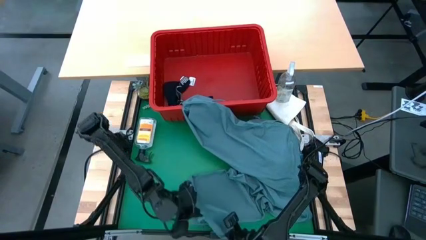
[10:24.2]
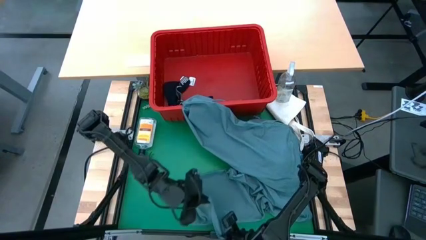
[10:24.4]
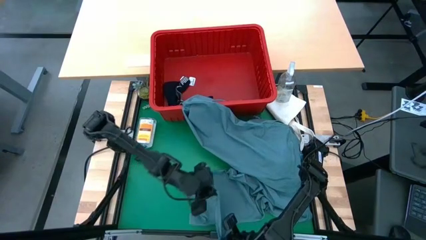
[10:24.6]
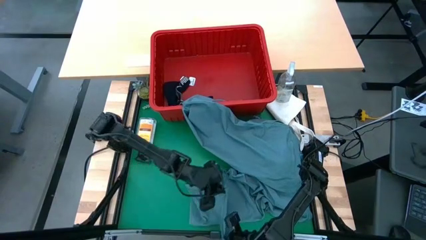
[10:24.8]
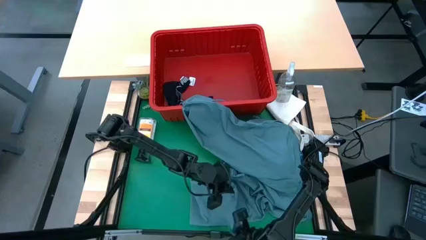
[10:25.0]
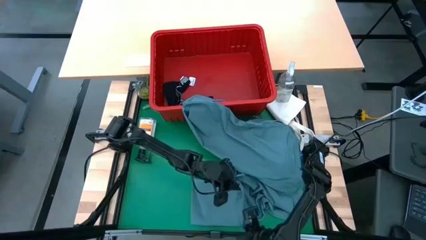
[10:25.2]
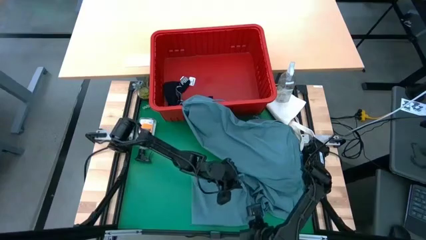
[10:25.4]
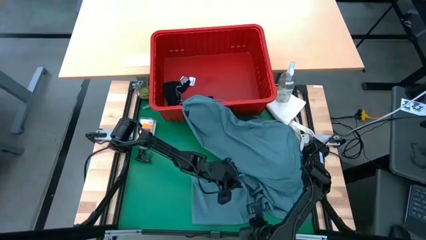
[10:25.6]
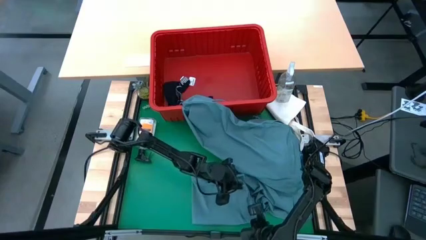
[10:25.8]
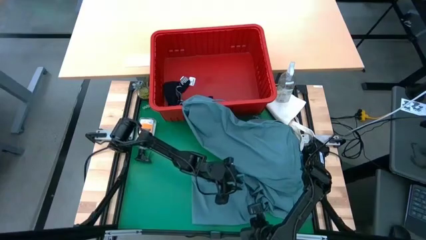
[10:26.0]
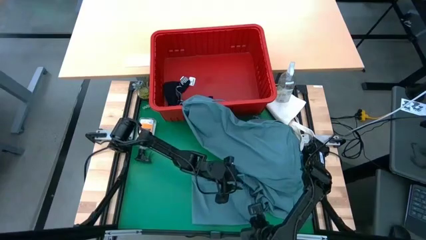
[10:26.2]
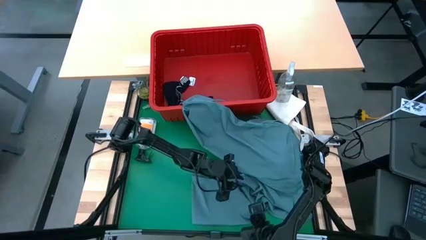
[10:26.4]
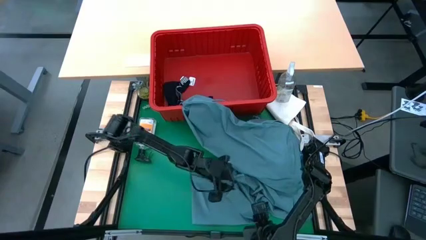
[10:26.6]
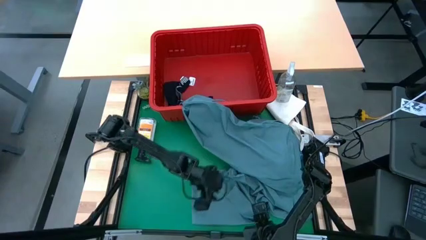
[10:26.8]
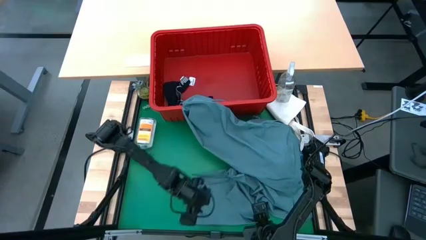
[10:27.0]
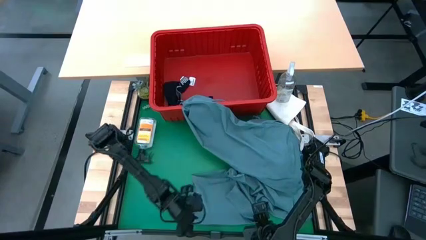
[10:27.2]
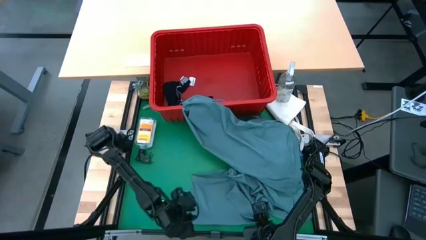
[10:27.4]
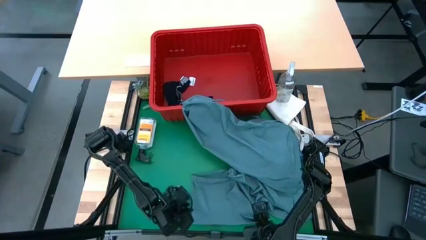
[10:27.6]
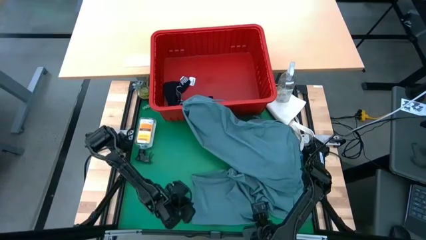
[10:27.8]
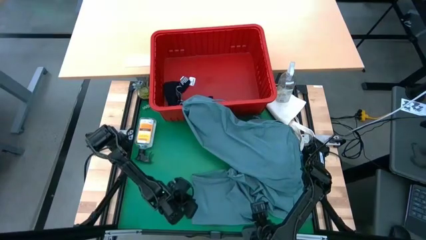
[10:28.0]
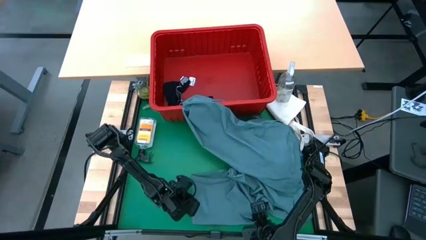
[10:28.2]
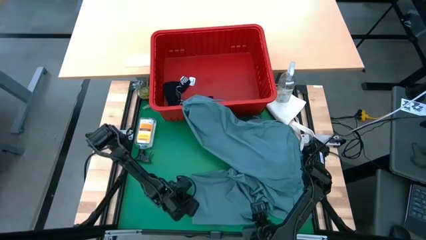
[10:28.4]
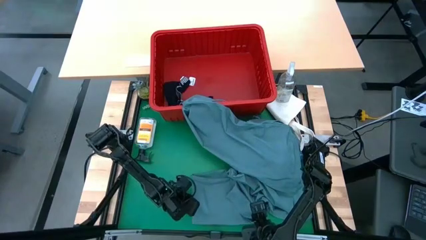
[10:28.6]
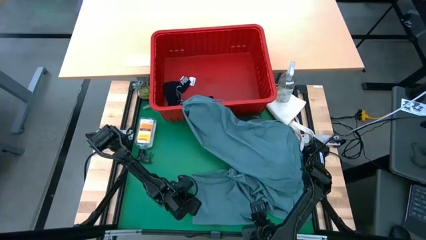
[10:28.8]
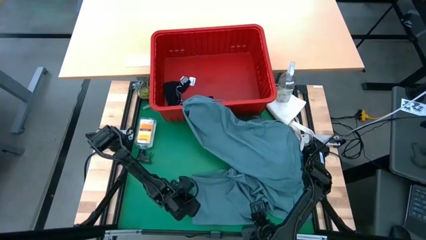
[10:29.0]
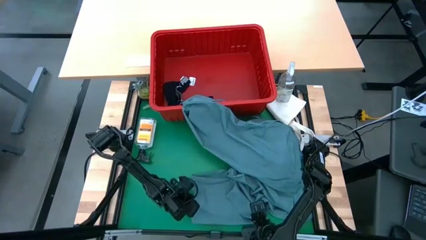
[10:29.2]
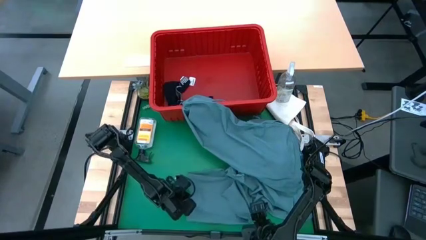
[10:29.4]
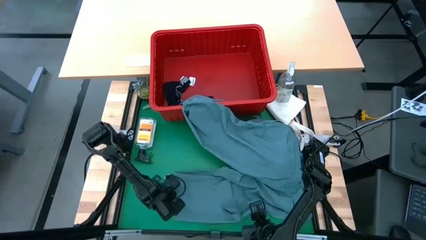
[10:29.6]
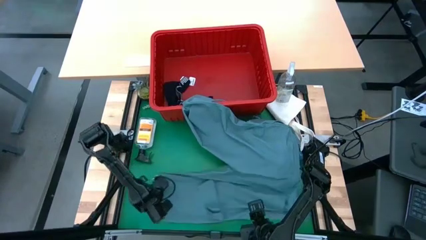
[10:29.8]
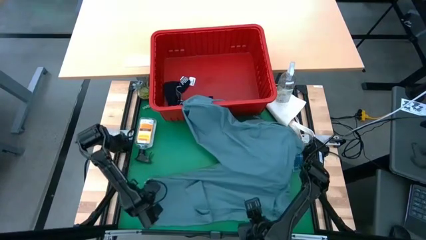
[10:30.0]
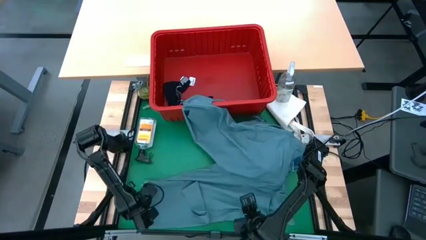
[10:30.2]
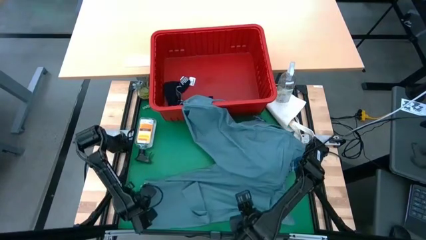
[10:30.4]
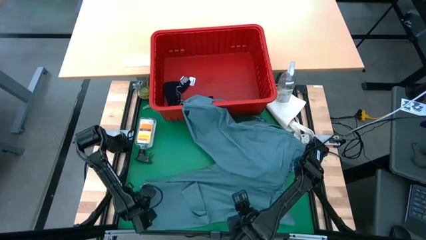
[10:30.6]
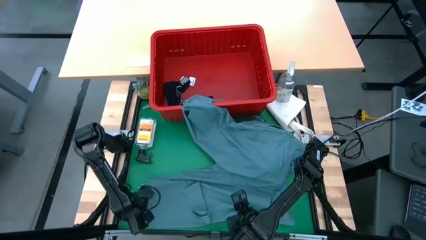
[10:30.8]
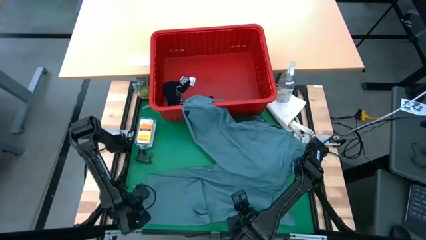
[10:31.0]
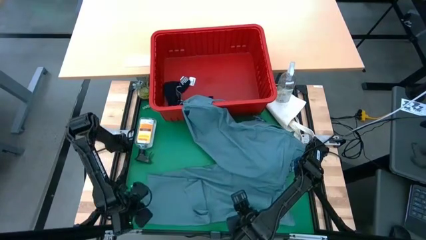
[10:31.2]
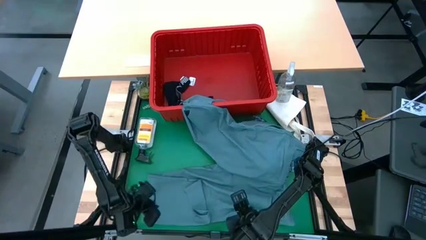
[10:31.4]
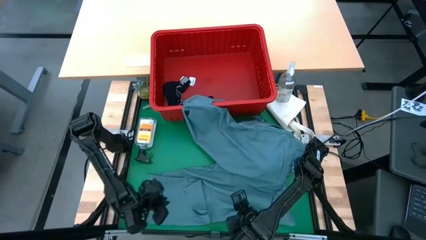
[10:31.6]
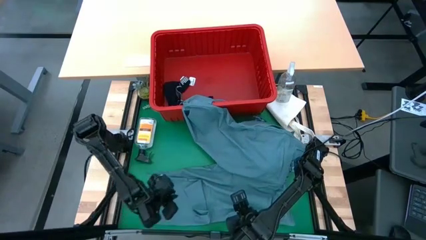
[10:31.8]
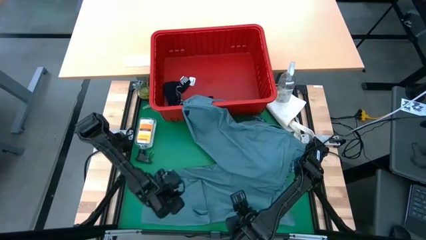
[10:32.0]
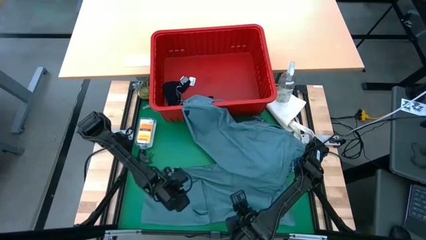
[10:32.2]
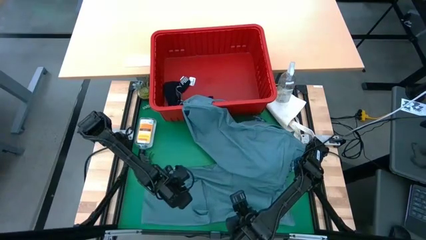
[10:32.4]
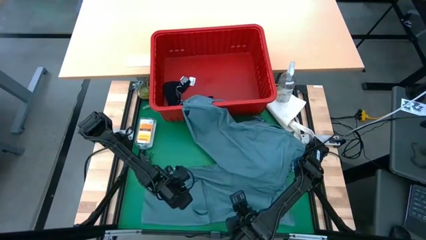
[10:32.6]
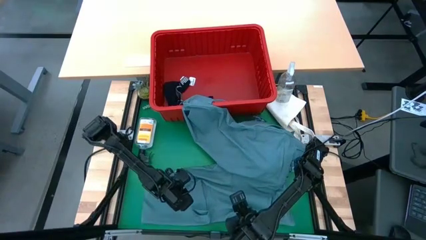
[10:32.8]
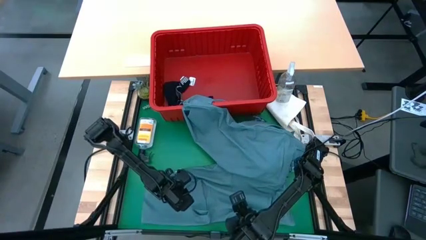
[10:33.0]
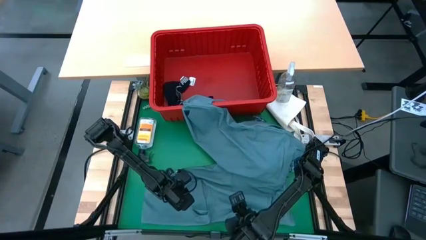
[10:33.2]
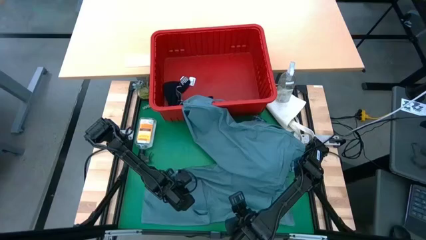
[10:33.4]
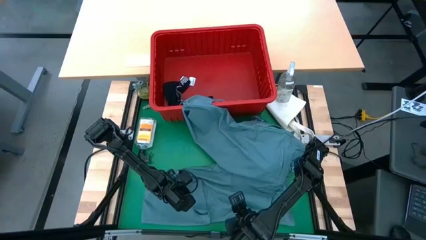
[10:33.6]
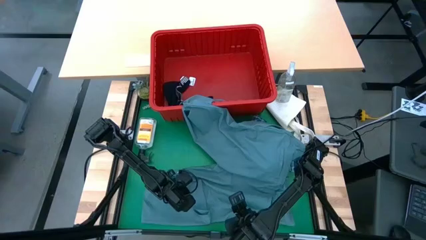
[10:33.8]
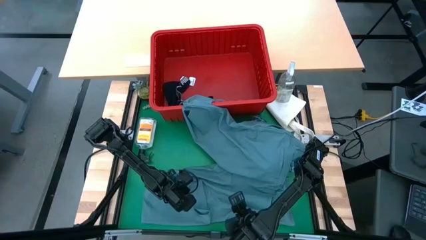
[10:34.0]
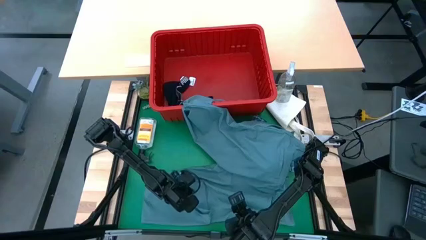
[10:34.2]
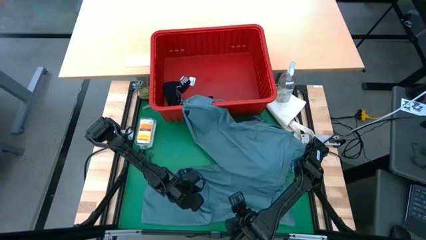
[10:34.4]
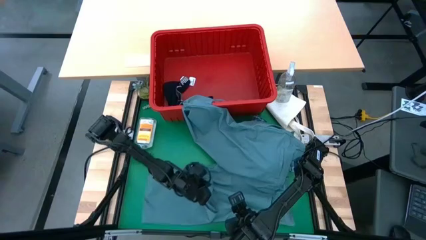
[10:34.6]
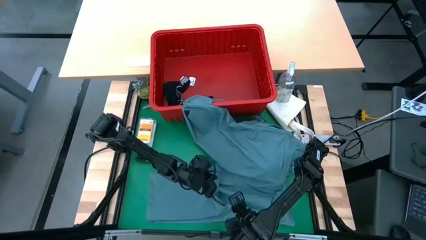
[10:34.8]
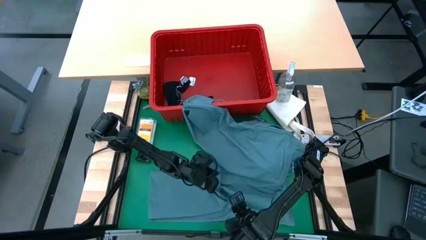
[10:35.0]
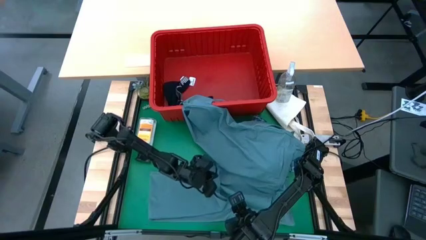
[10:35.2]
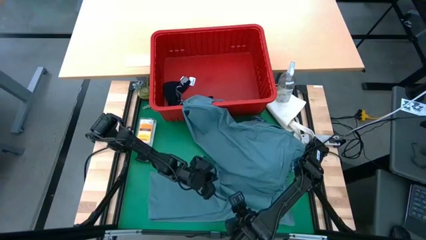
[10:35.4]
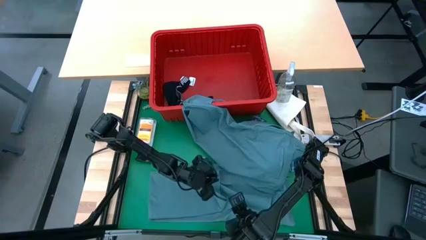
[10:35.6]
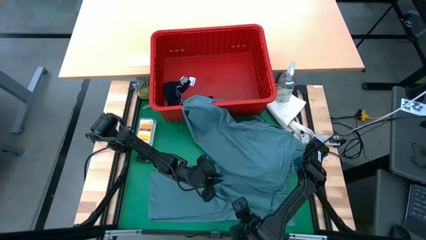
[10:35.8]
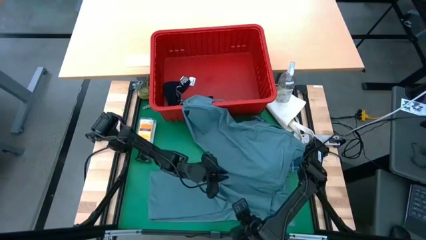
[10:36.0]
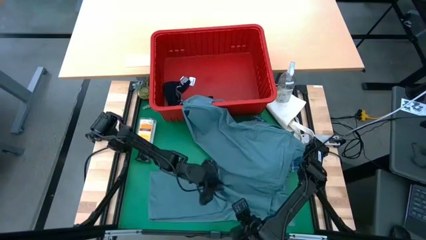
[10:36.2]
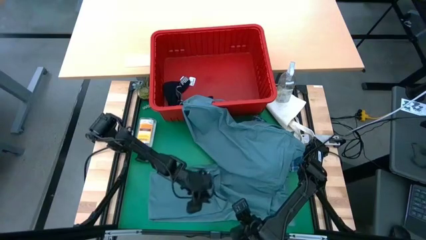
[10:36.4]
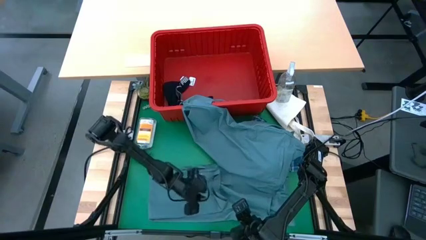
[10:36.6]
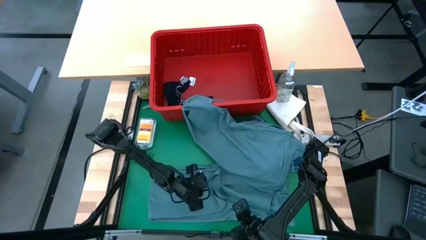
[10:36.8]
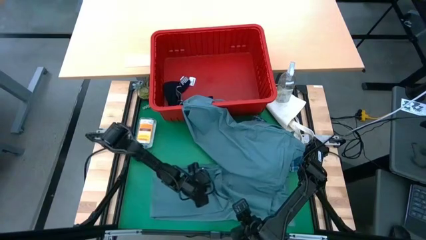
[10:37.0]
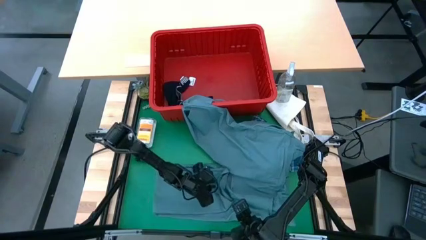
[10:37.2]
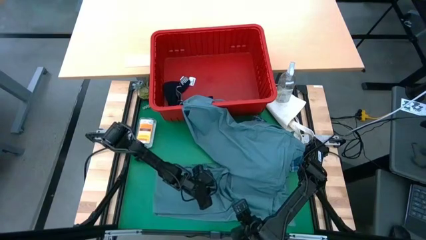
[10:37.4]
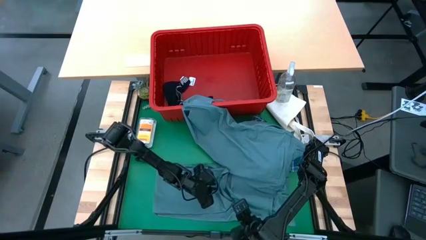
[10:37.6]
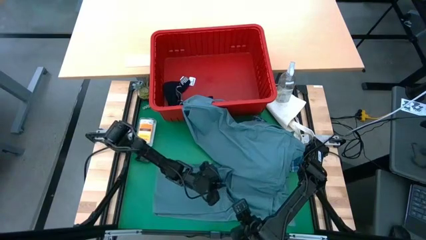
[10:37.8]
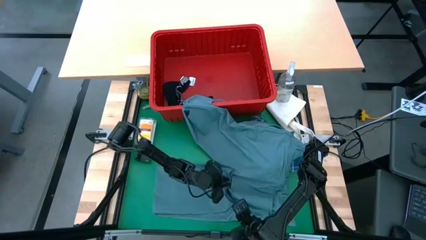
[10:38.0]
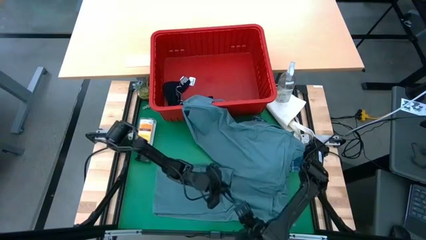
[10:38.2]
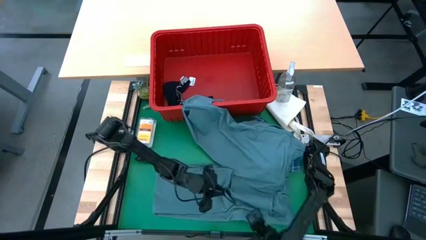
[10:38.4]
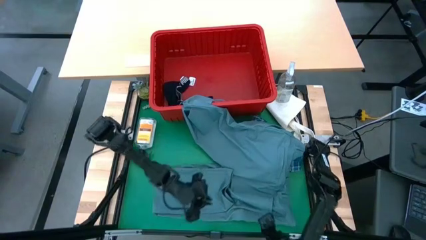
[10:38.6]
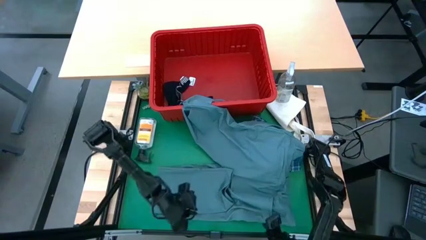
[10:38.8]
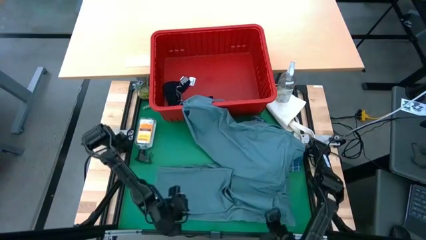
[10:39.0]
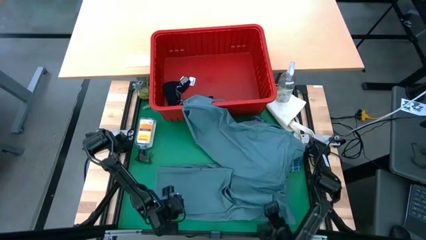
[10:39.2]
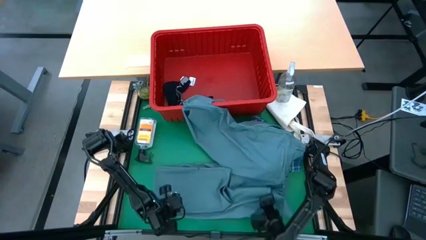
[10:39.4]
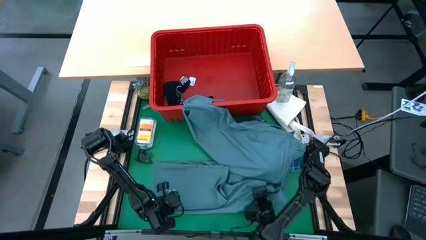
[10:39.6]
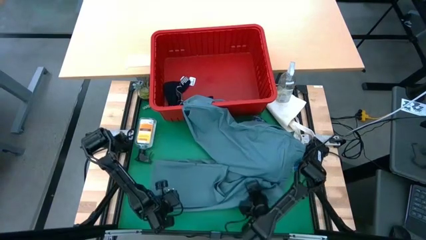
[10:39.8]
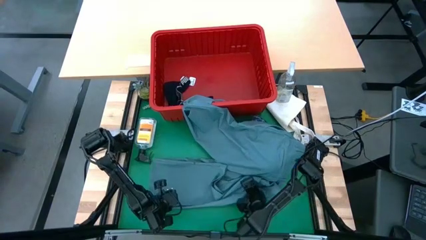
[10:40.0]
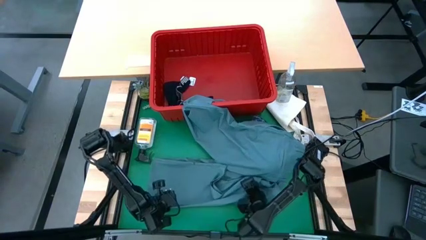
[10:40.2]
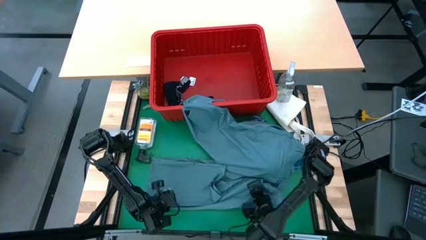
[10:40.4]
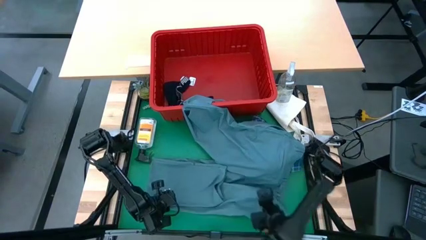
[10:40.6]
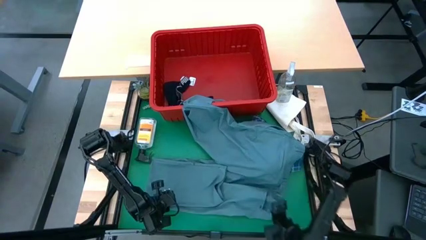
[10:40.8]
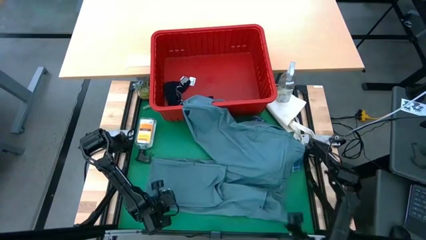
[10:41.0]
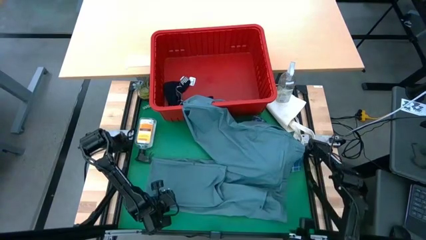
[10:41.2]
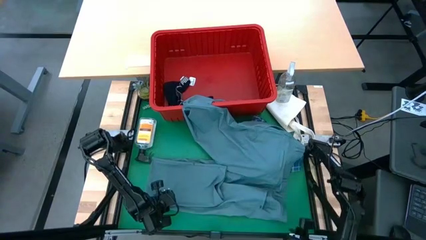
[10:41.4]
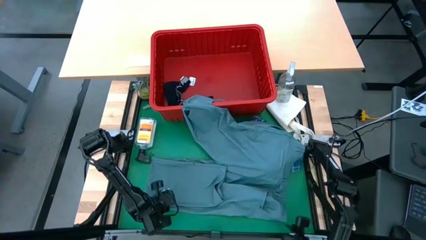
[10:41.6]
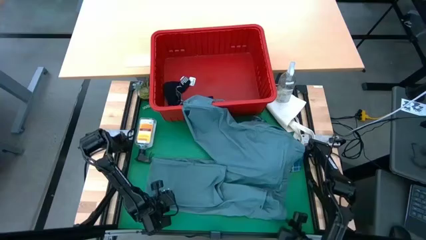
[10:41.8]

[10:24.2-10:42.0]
Task: Fold Laundry from Bin
Fold the blue pants on top of the blue shirt
